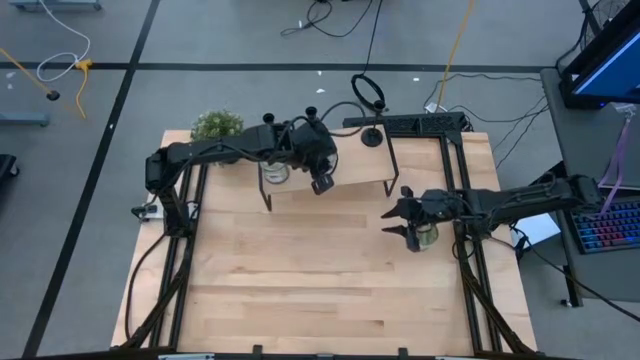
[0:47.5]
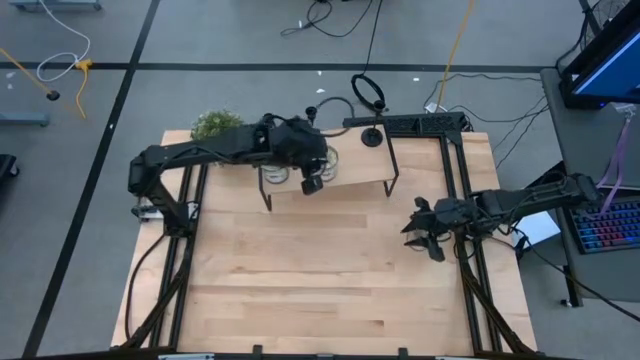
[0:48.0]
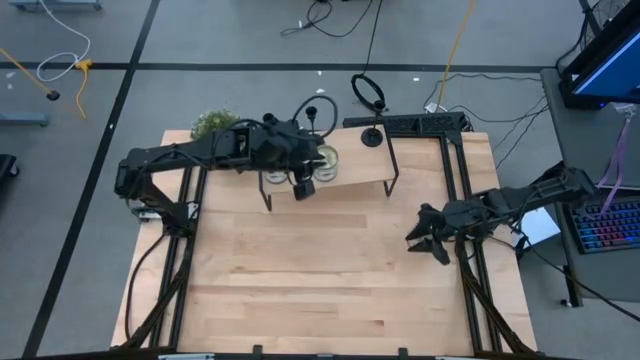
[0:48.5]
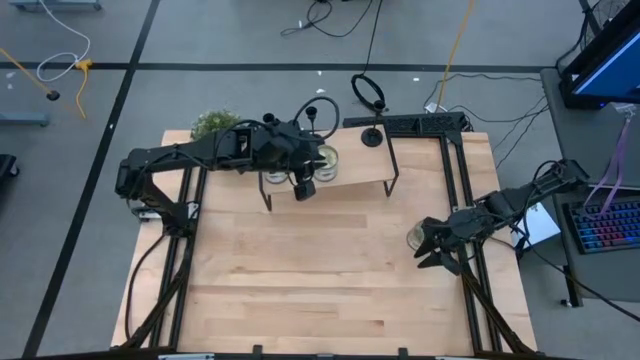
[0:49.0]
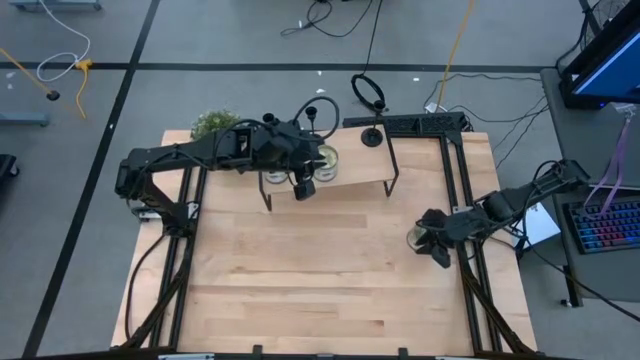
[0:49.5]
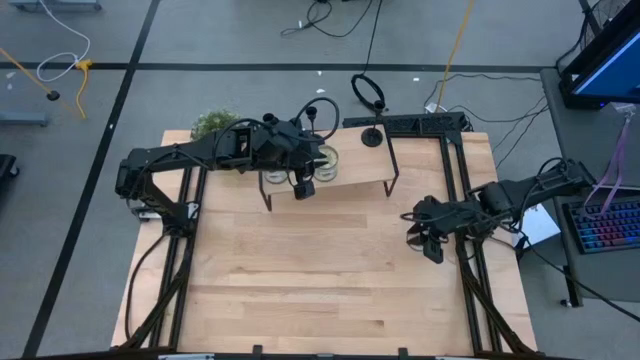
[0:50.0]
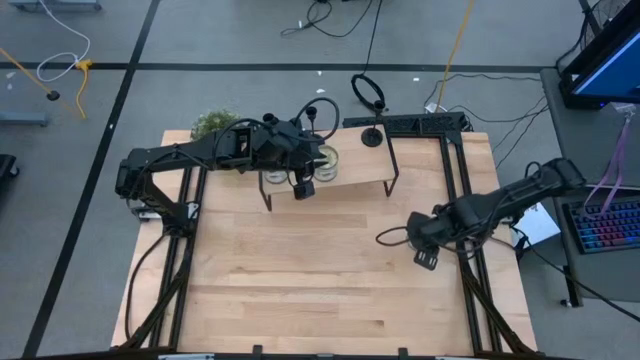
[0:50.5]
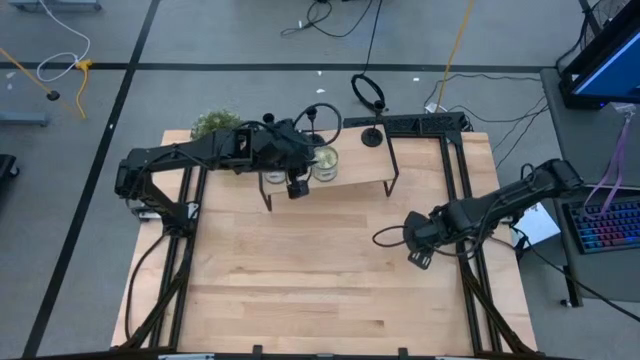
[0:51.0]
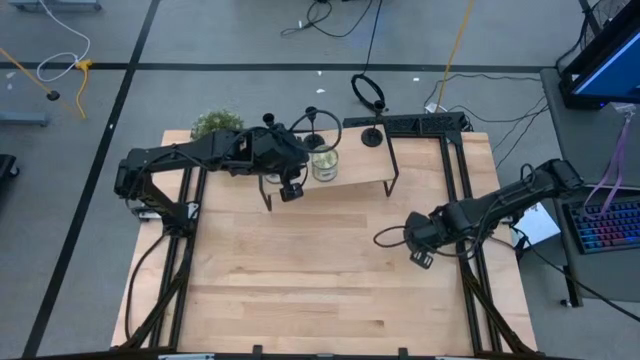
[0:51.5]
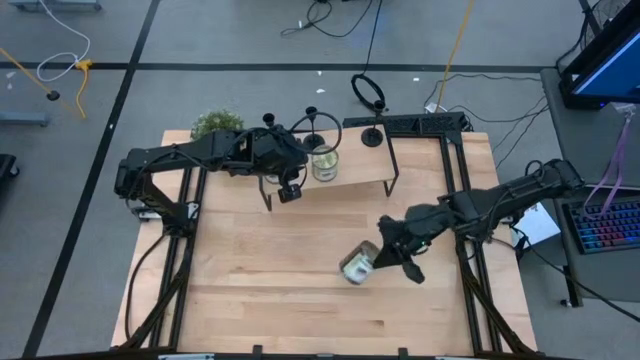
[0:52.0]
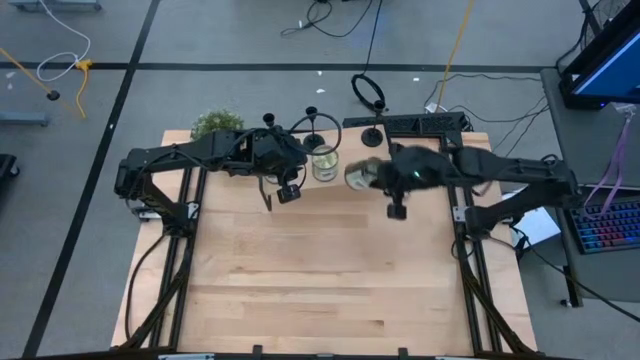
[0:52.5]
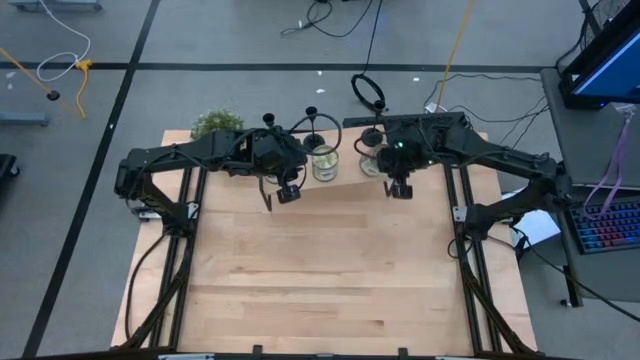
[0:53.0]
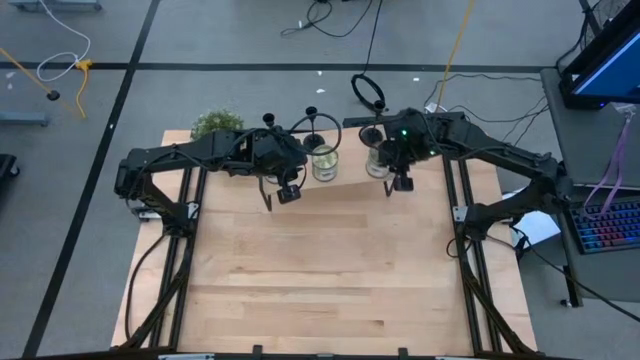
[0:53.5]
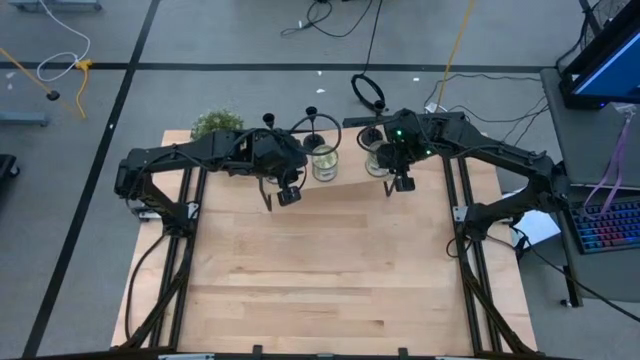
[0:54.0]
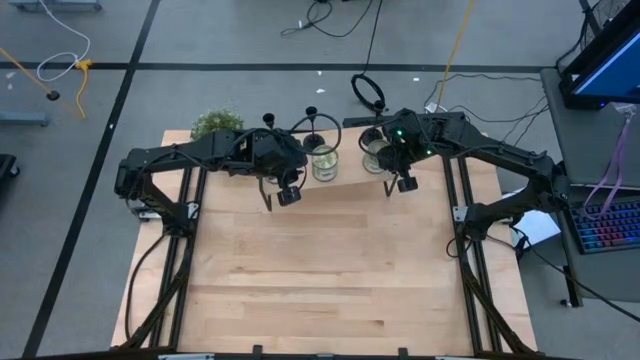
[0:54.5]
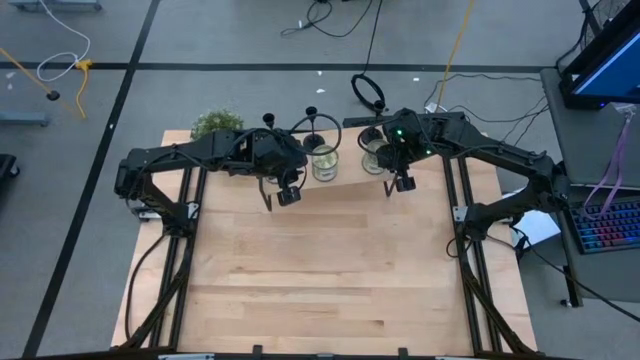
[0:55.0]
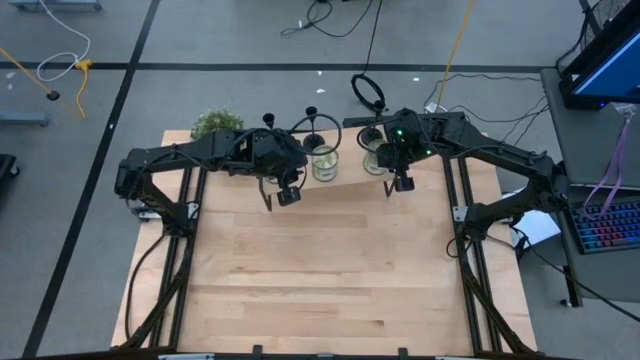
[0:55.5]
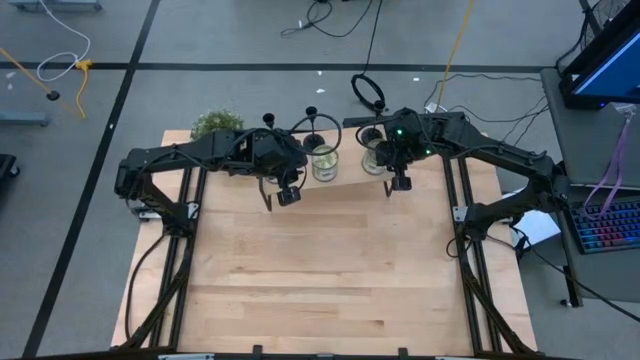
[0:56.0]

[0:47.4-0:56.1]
Task: Pick & Place candle stick holders
Put the silver scented candle on the shelf aligned with the silver scented candles

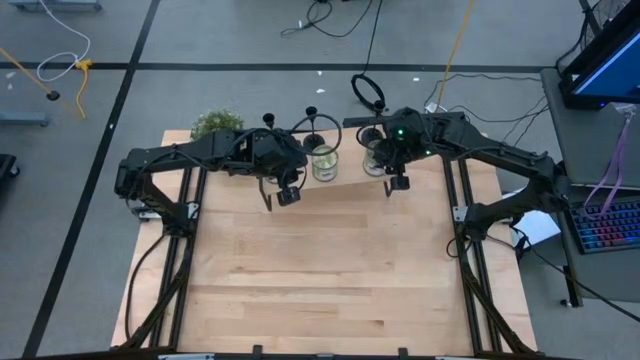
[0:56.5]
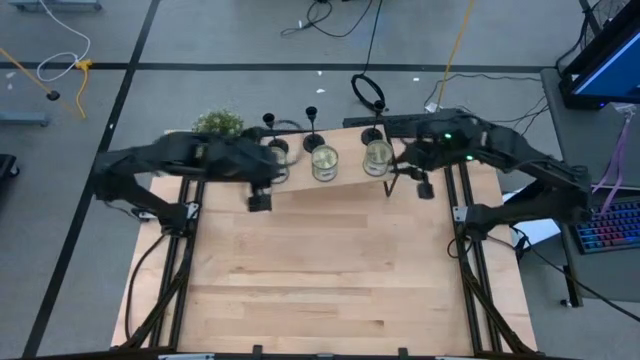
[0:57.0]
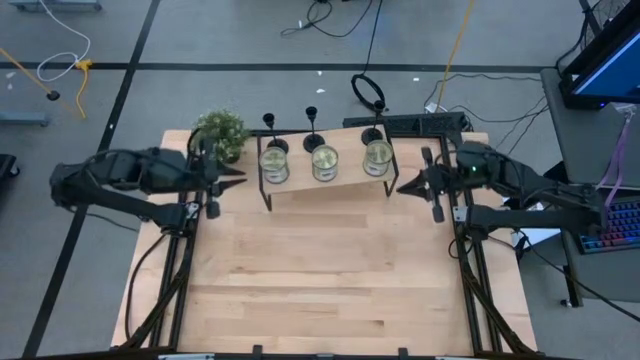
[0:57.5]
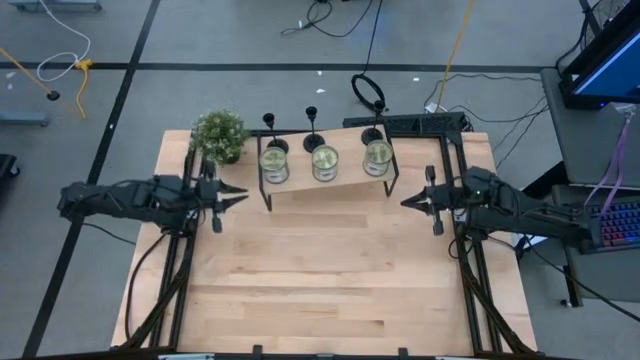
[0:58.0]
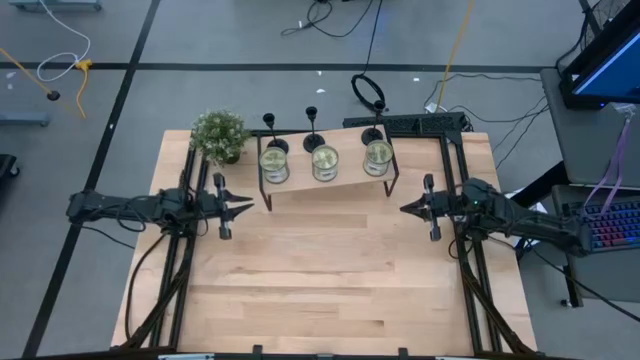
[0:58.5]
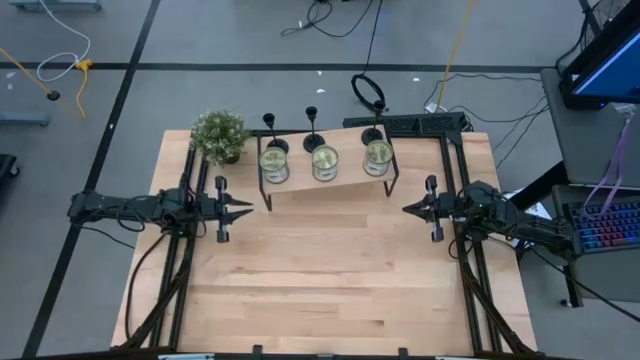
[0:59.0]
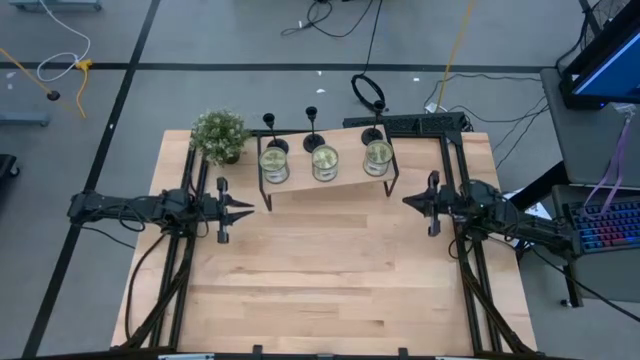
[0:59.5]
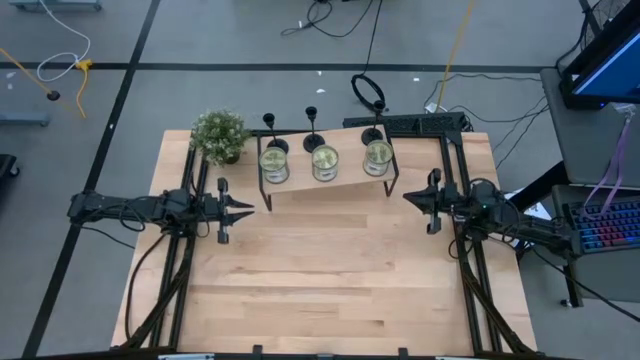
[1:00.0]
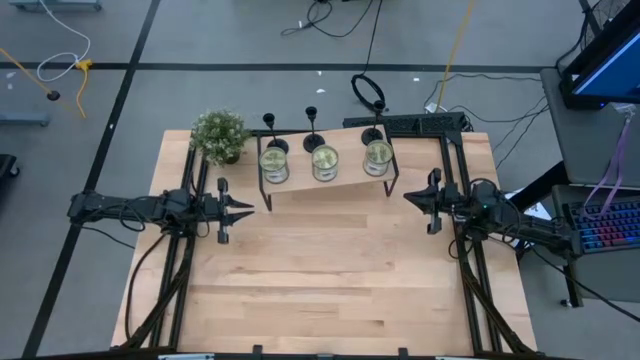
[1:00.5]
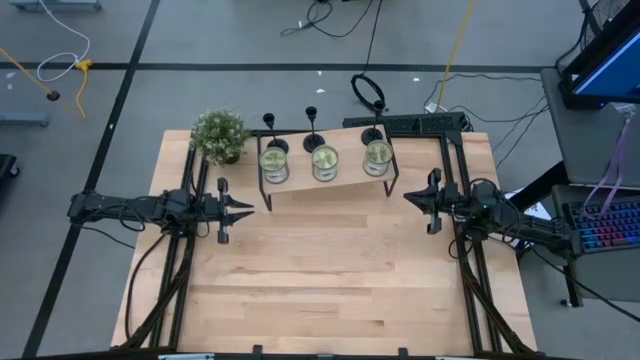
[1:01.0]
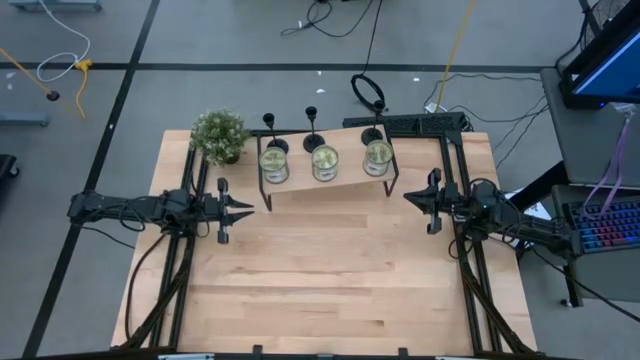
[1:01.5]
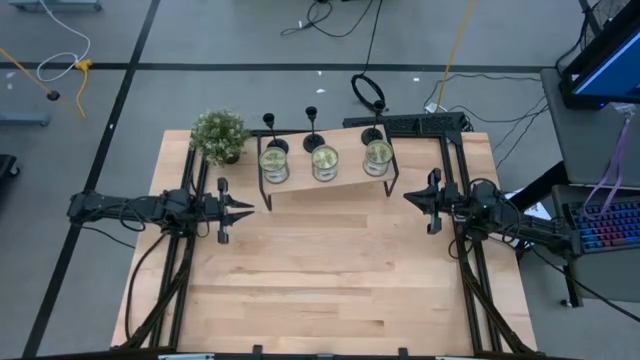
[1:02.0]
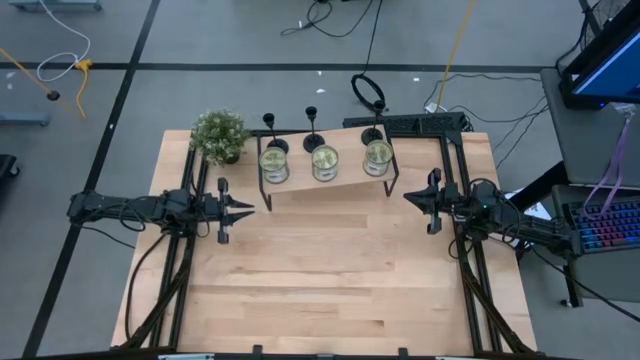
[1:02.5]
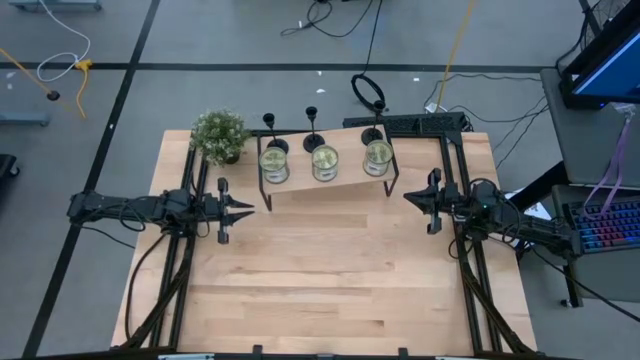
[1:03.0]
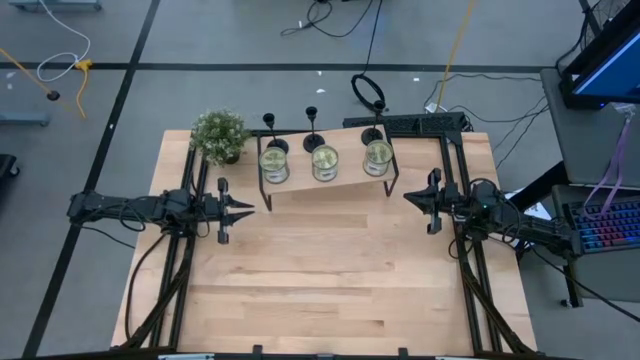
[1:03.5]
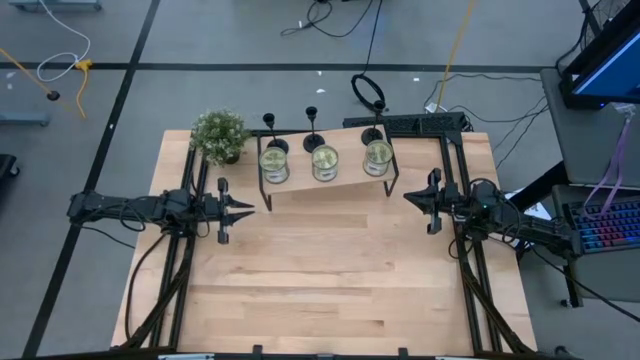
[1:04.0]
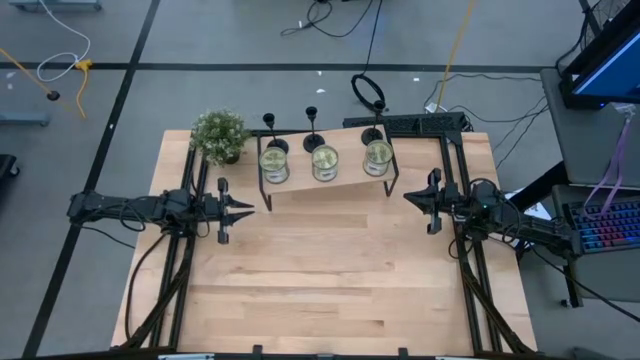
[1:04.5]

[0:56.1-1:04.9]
Return to Home Position

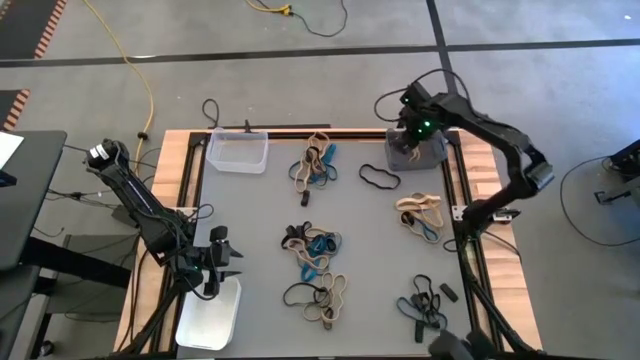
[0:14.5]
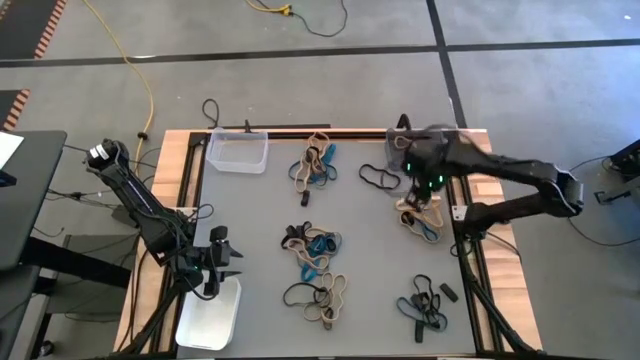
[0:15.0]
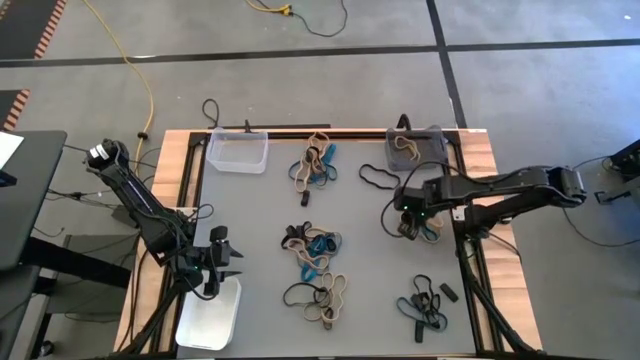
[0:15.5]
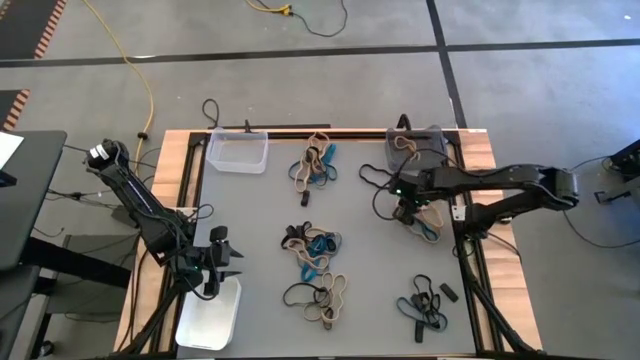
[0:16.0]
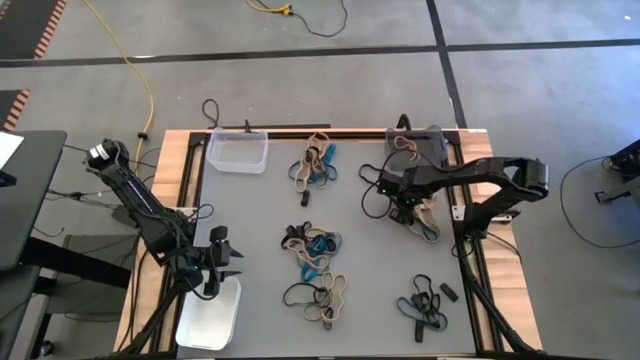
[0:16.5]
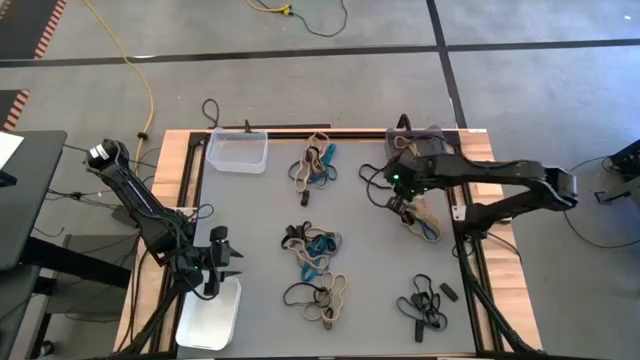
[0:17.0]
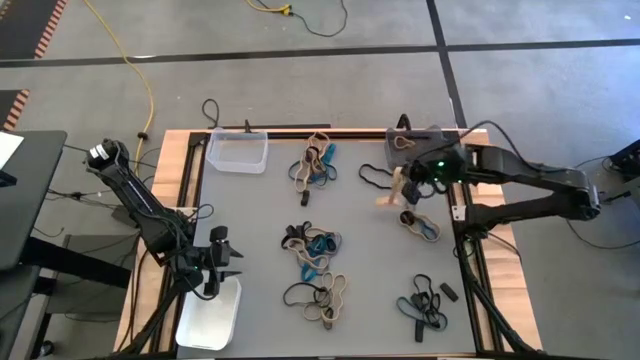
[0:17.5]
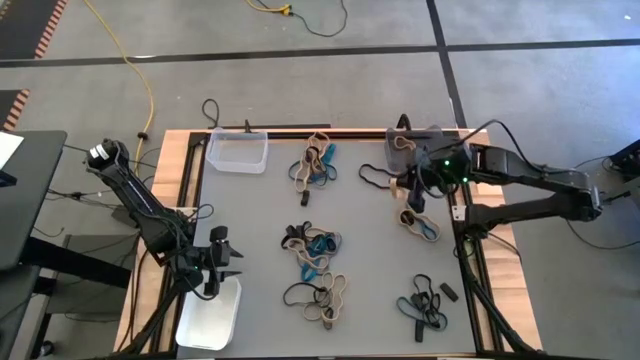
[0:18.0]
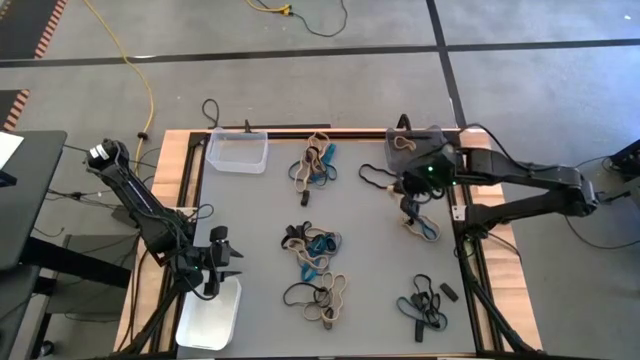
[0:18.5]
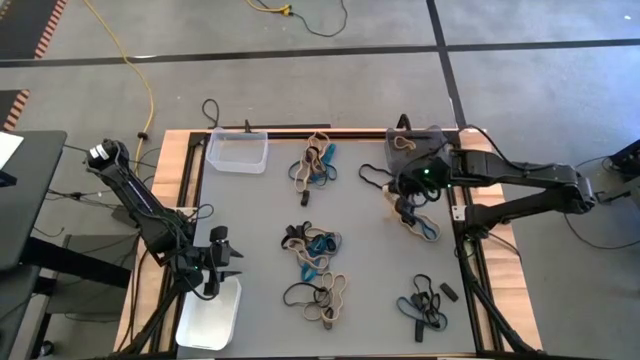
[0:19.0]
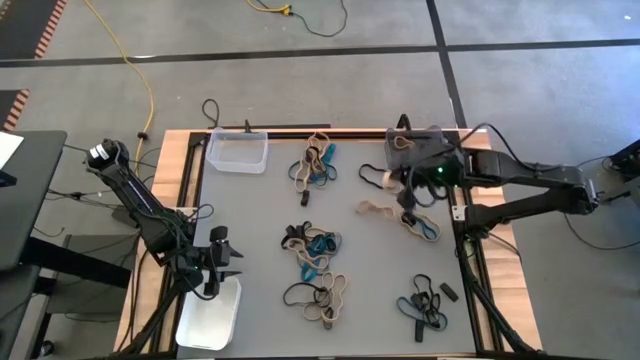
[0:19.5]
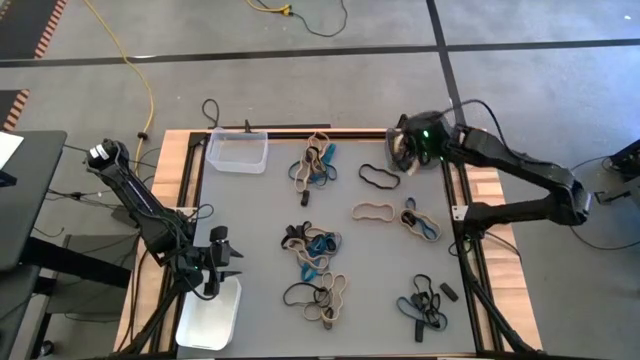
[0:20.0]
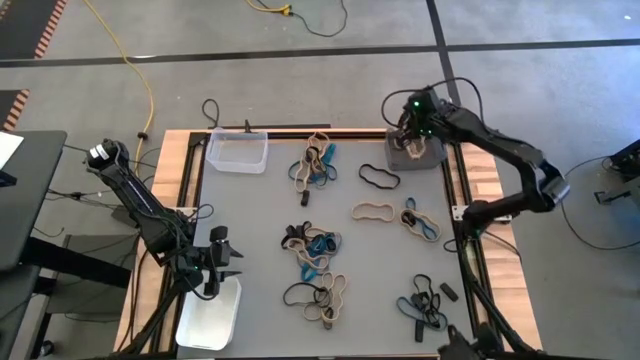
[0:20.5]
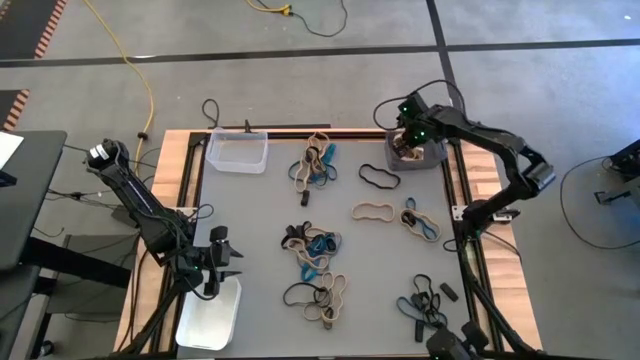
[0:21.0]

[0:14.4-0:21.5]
Task: Sort rubber bands into baskets
Put the white rubber band into the black transparent bin
